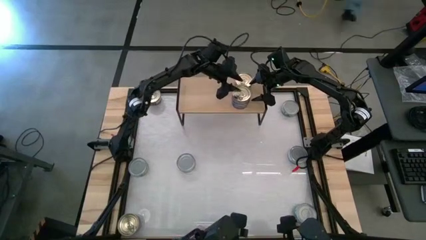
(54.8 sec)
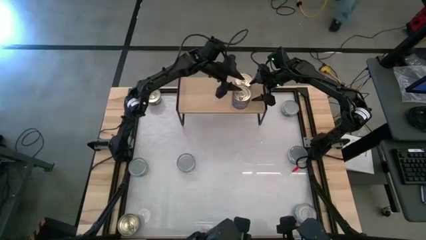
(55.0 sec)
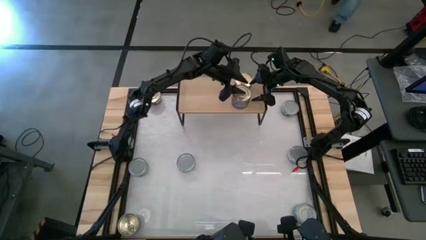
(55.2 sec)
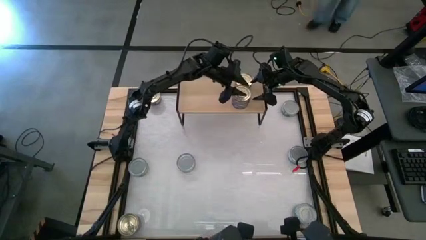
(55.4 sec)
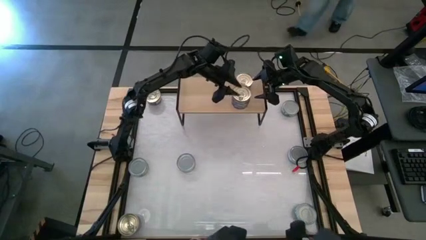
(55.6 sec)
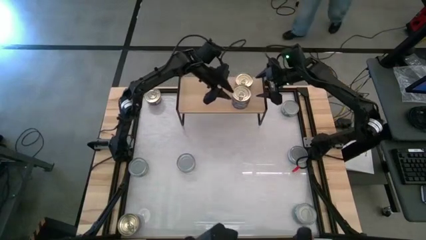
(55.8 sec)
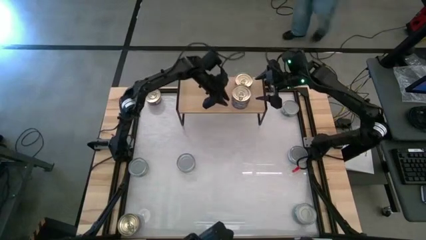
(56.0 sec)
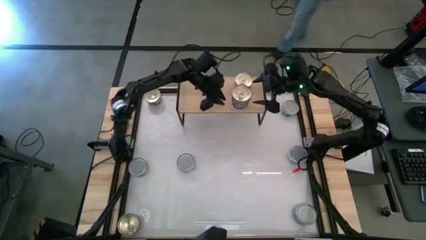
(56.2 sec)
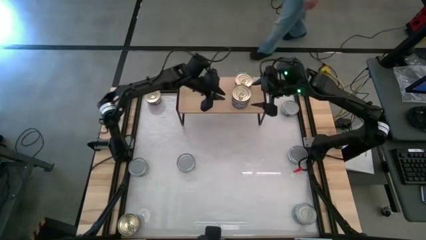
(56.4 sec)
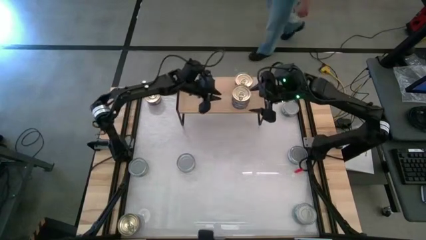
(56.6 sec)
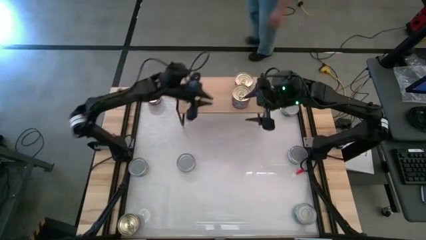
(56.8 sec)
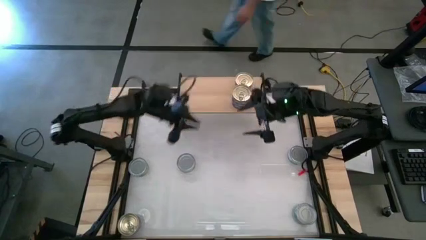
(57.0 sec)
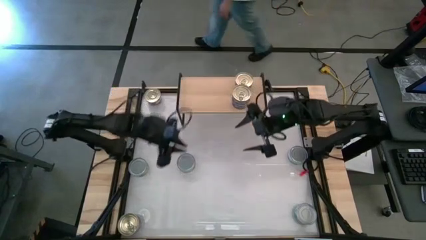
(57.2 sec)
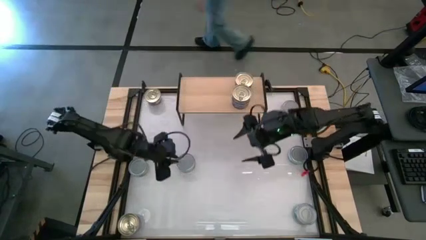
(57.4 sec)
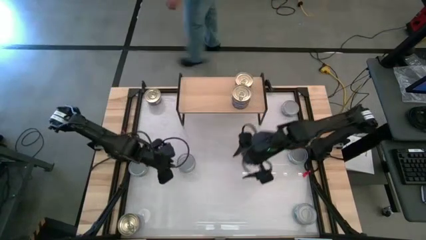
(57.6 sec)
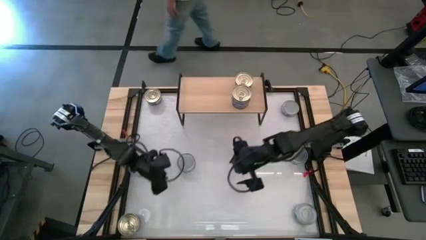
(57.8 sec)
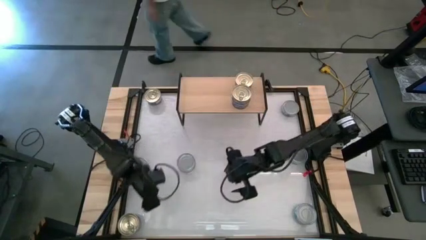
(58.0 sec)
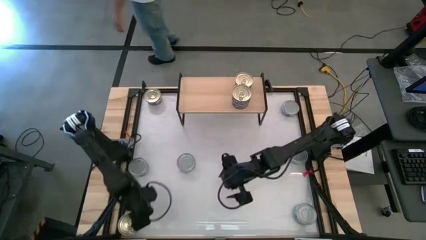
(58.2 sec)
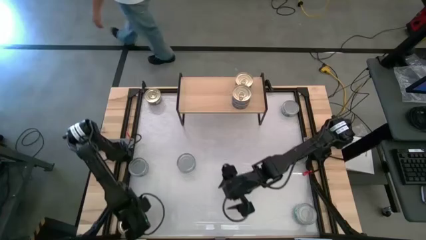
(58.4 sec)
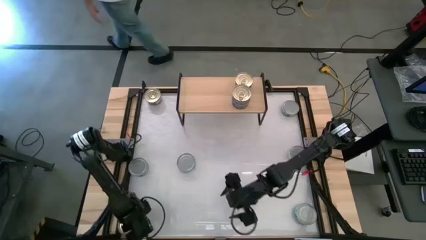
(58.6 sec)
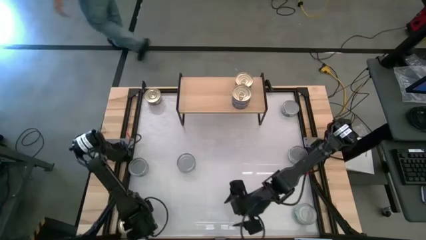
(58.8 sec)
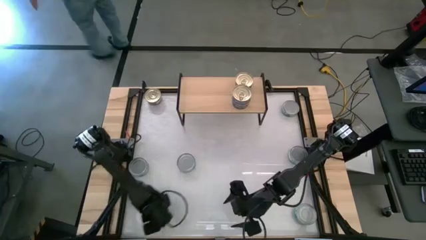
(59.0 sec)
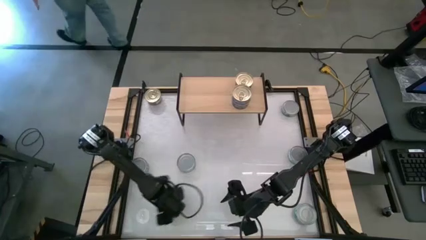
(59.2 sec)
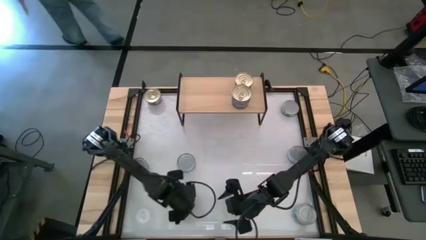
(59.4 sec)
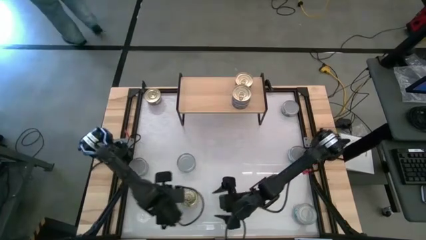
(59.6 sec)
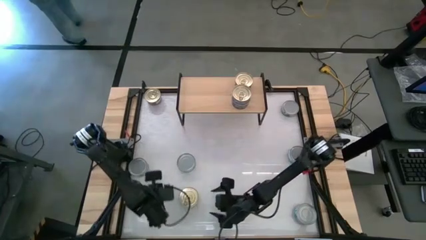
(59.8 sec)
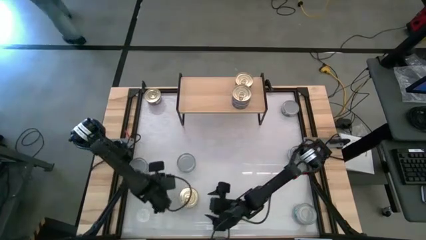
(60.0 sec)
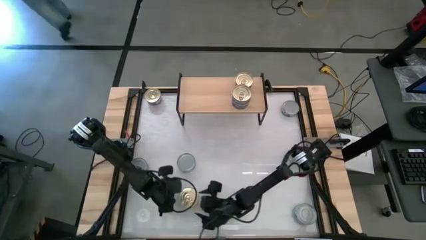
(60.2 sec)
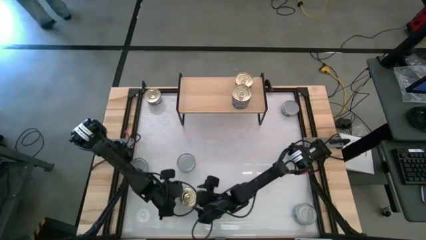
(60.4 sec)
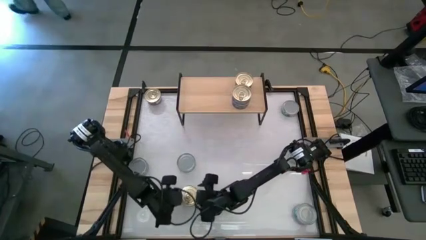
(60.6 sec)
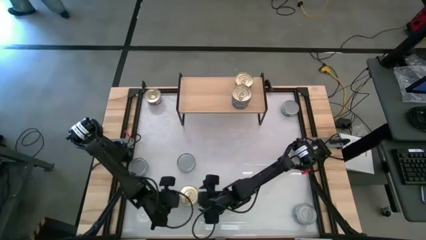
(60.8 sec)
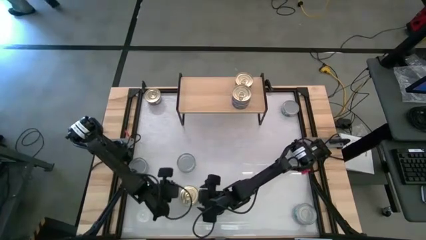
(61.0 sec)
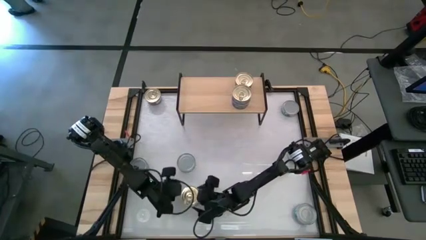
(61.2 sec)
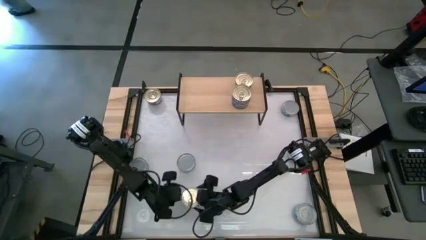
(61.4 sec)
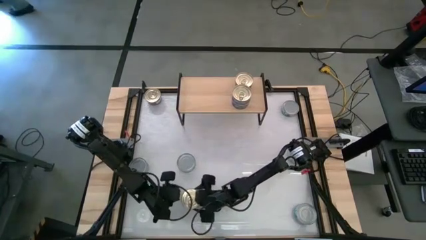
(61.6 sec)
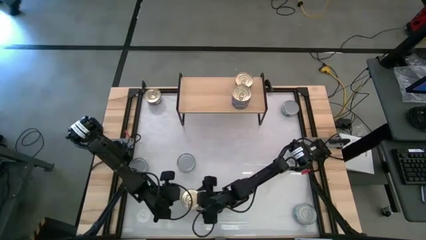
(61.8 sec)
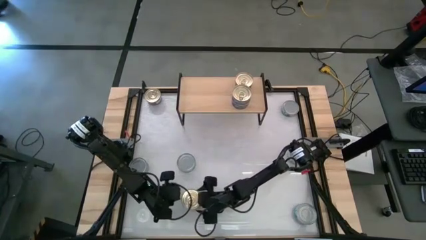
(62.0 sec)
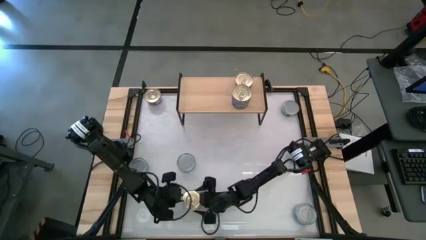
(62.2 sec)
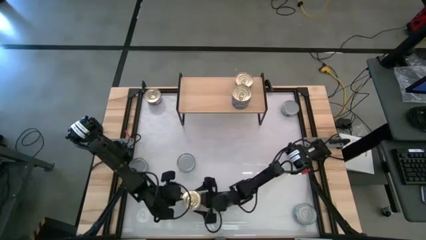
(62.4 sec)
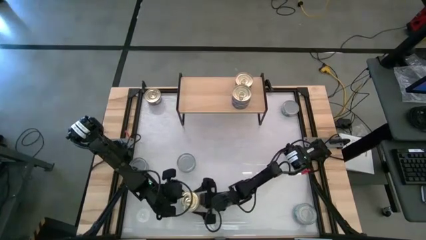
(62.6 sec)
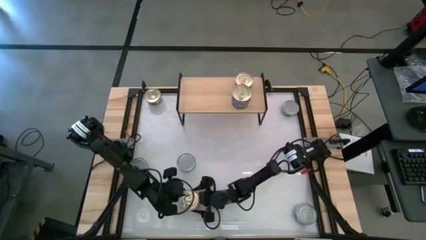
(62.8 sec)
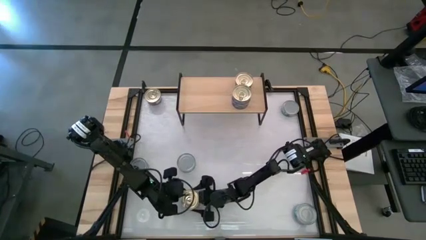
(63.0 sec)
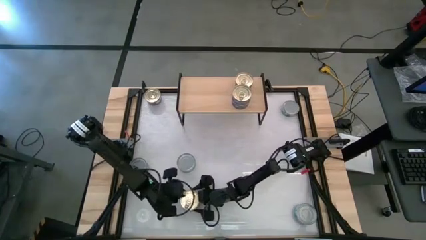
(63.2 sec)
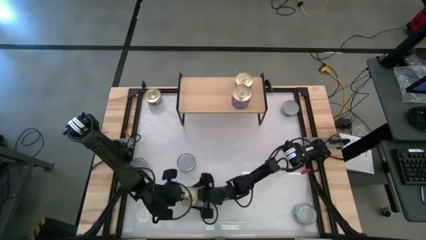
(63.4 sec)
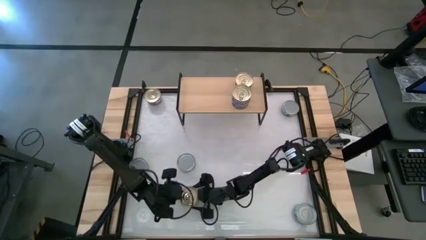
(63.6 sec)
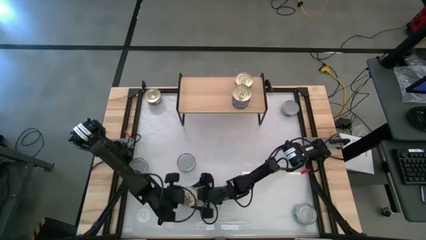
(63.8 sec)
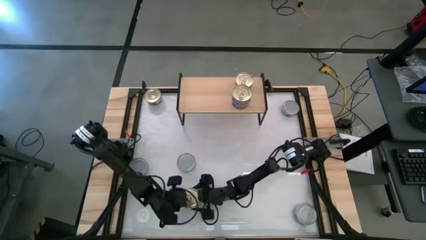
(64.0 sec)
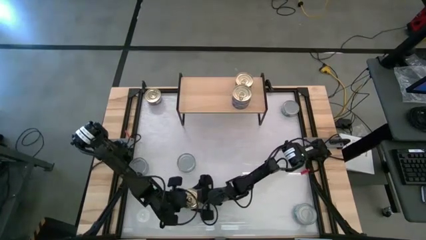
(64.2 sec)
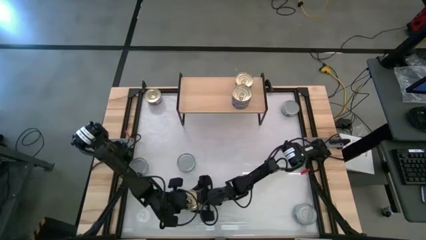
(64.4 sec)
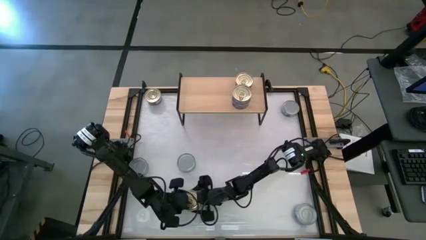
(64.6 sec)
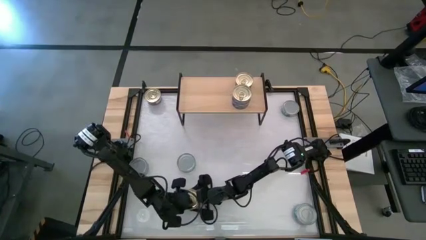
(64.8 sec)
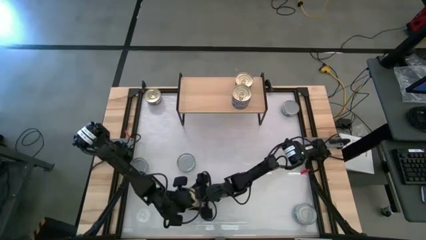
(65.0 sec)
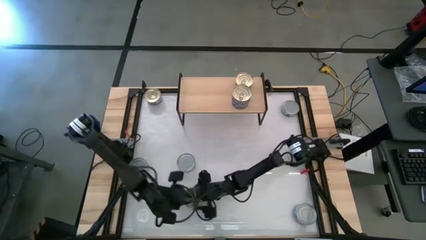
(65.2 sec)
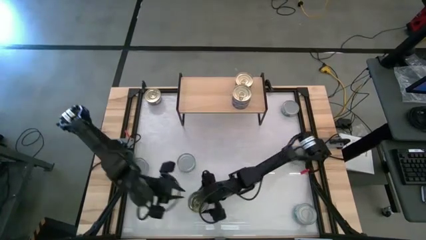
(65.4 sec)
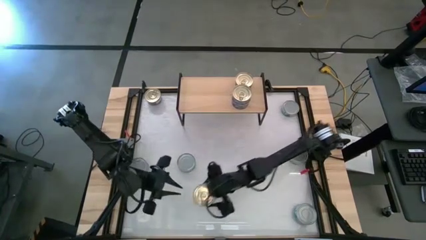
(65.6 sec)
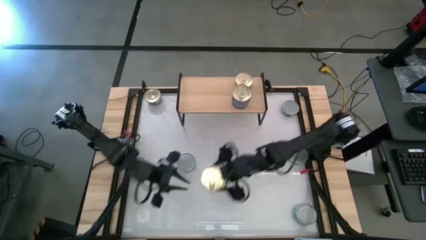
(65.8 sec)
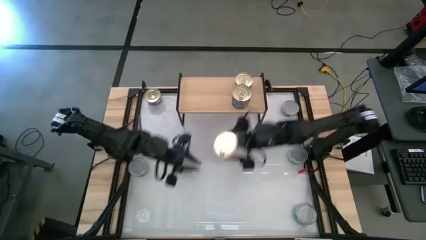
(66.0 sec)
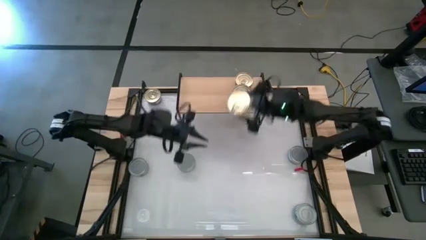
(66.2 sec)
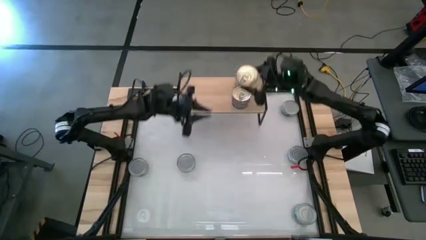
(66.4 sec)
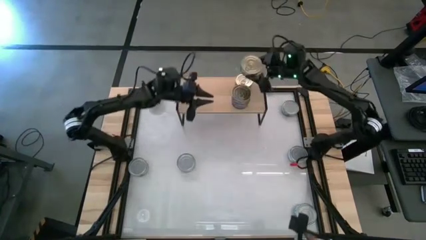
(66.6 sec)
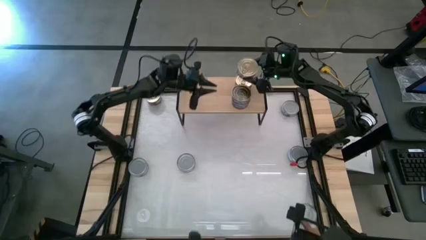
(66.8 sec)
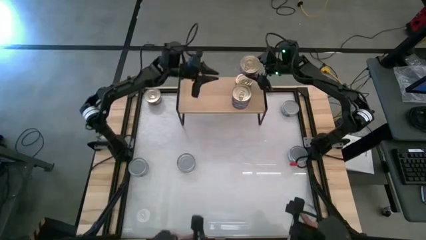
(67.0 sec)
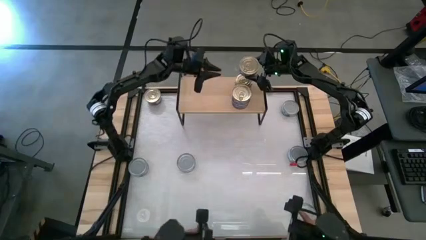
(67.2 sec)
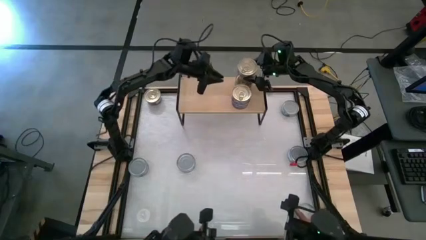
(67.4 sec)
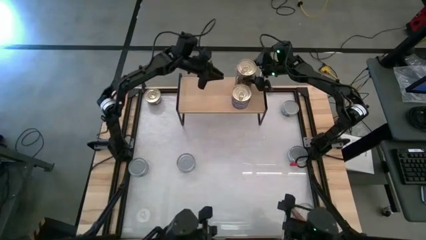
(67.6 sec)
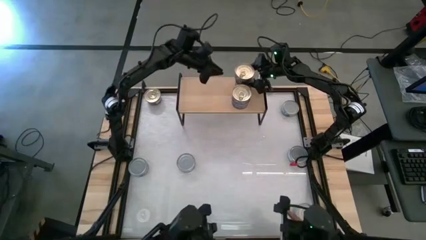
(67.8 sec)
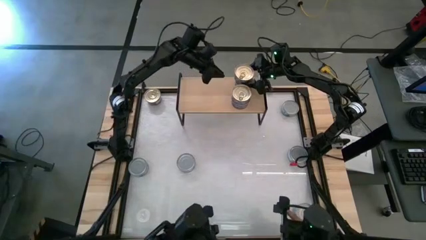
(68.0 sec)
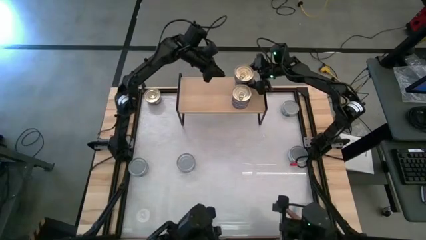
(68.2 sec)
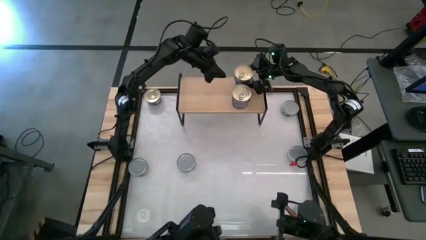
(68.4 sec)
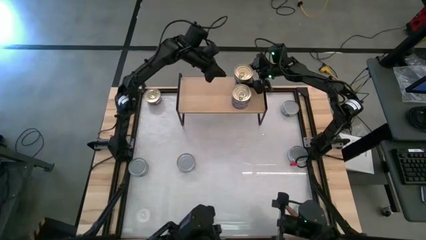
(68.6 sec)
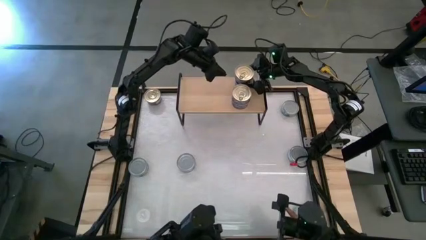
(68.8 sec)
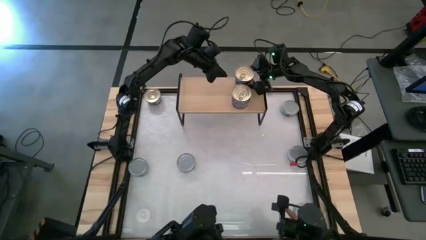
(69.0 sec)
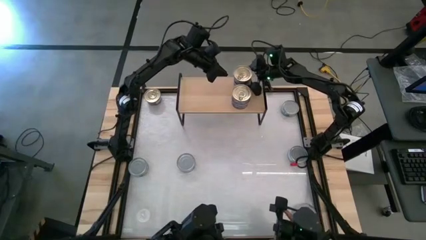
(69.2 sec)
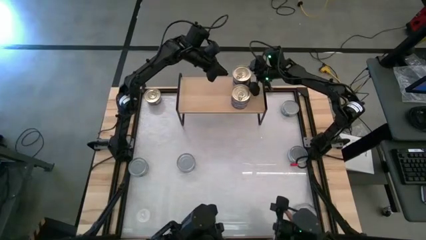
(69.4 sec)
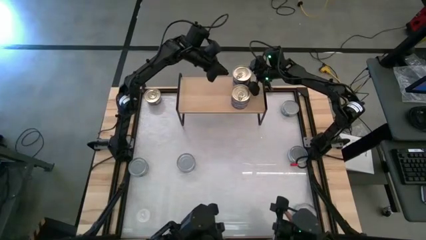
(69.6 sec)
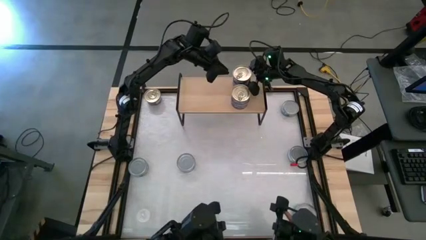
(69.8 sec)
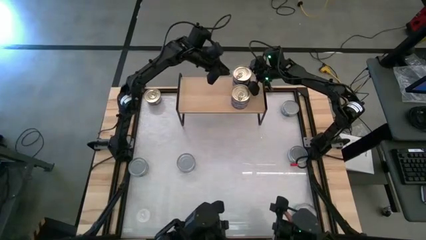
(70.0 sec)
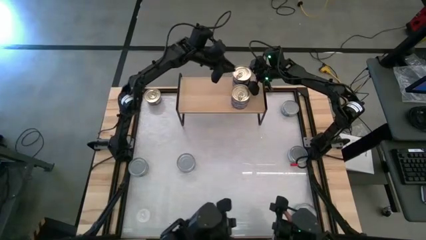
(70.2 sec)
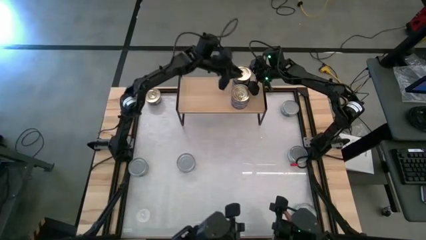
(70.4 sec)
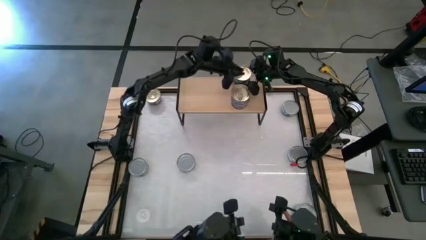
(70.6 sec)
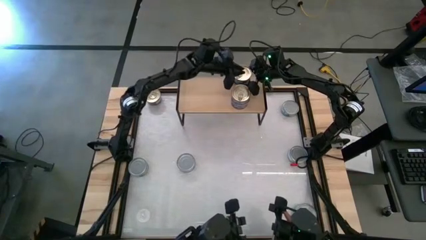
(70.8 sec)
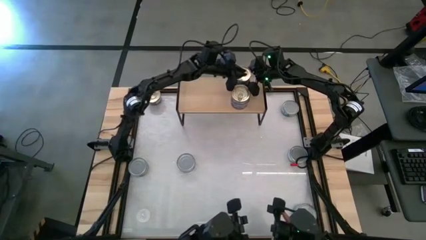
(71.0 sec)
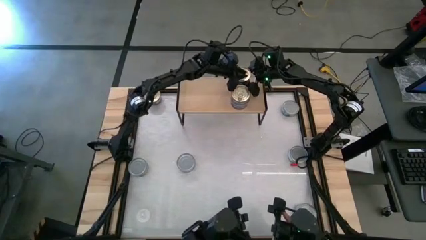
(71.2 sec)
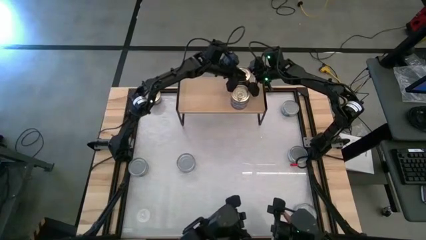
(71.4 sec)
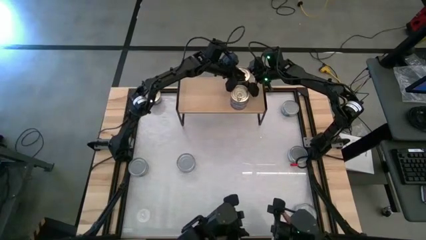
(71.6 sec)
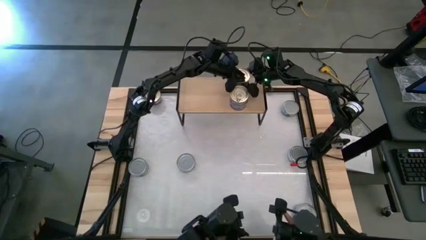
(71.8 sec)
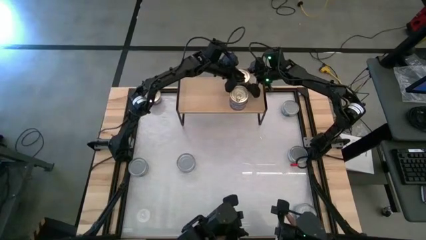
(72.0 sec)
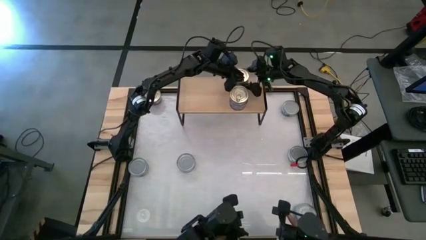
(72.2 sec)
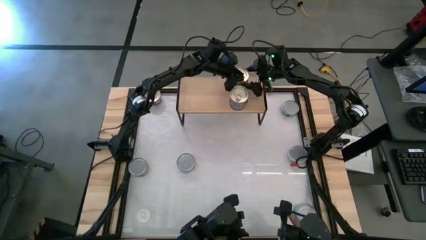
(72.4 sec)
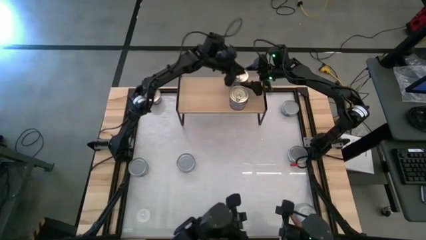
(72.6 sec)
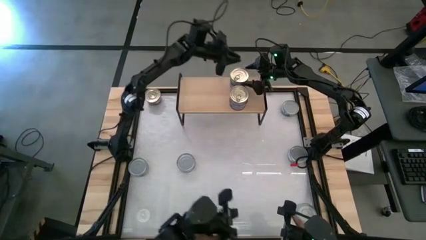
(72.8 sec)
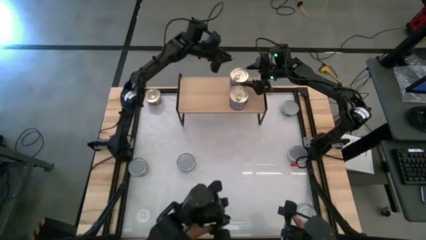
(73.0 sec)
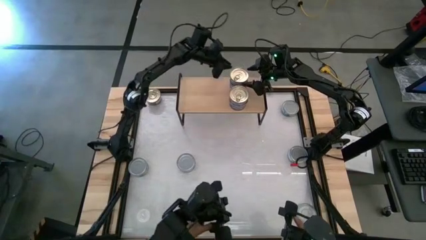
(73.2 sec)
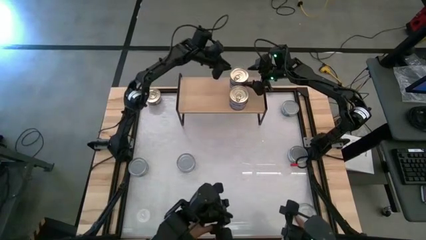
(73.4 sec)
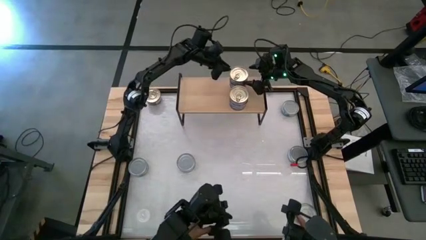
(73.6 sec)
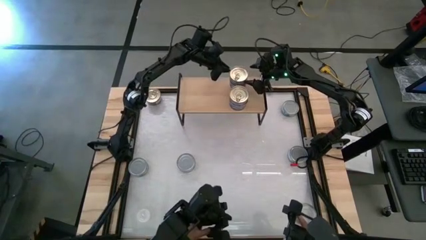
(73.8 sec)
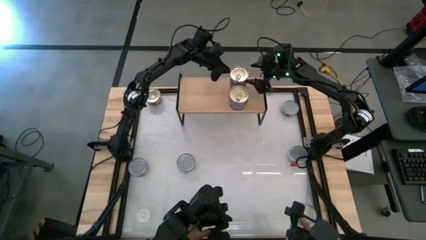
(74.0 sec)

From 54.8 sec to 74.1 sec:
Task: Stack canned seafood by type on shelf
Stack the blue-pink tuna can on top of the other blue-pink tuna can on the shelf
